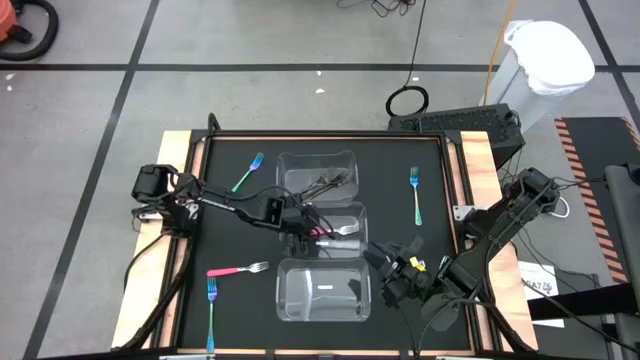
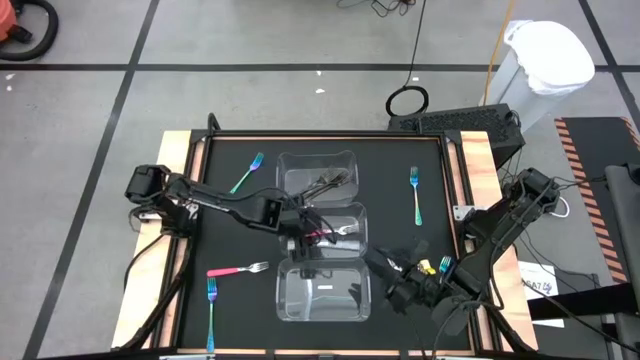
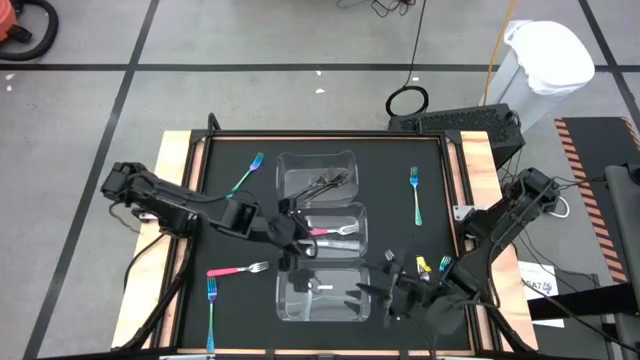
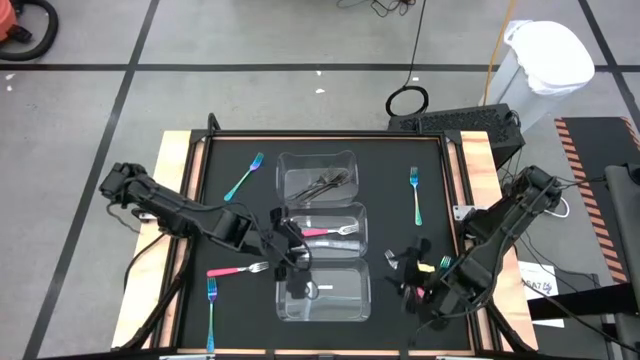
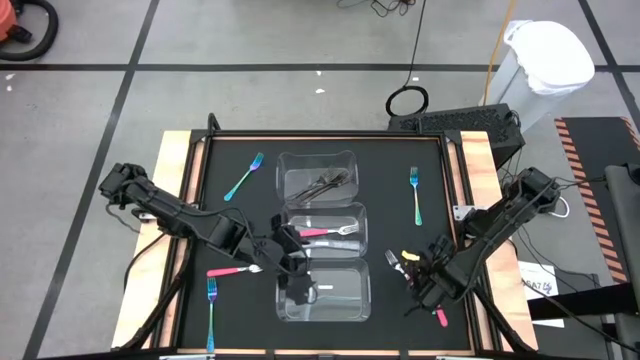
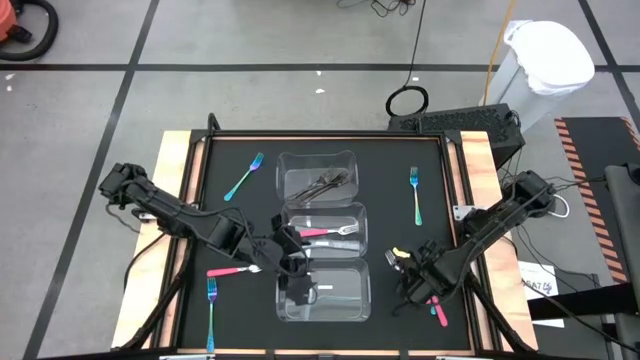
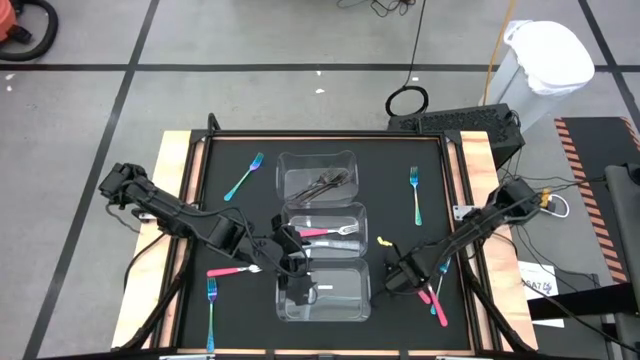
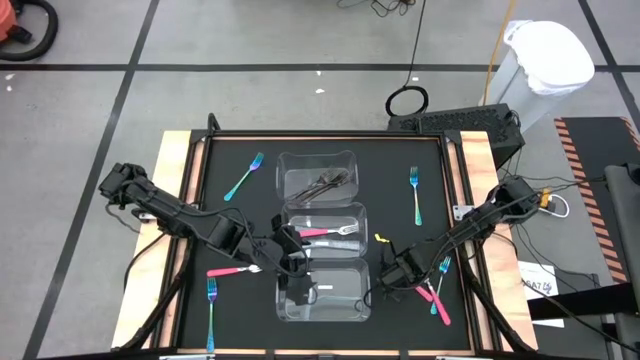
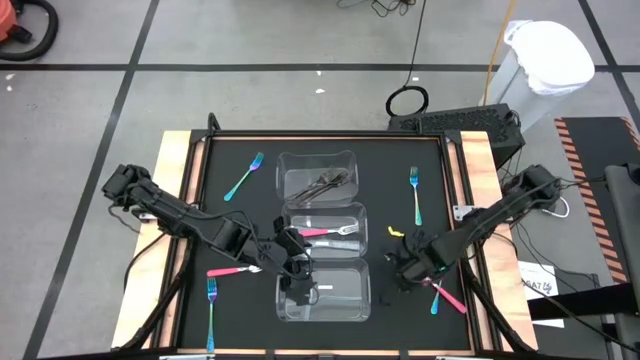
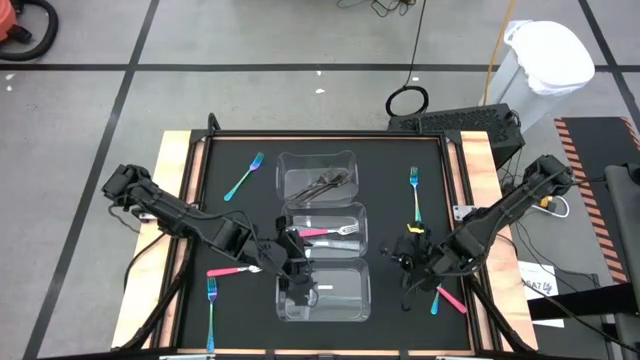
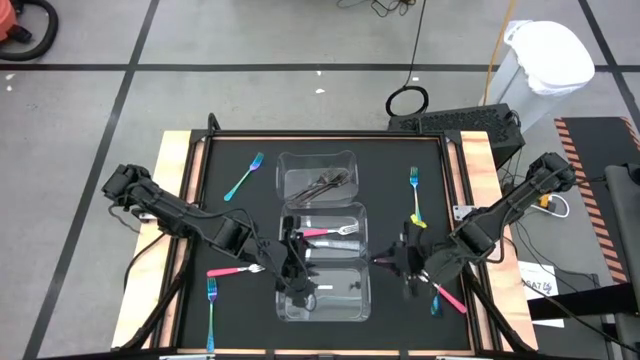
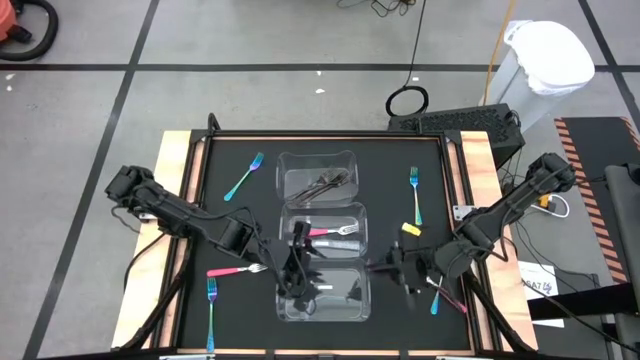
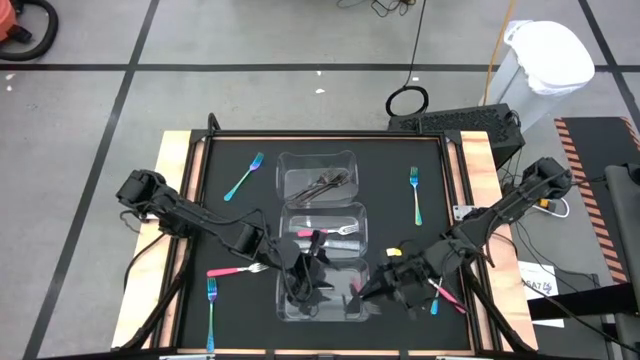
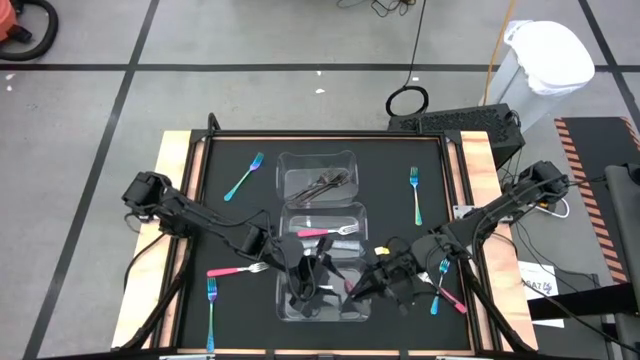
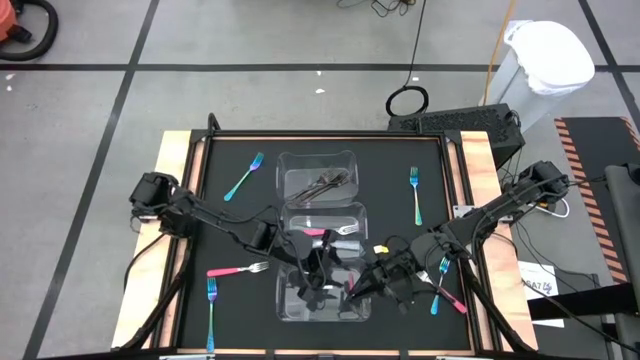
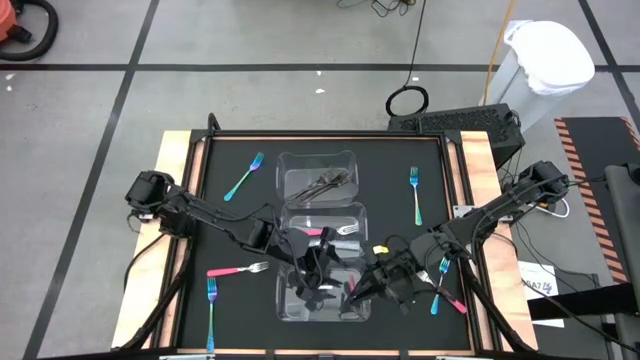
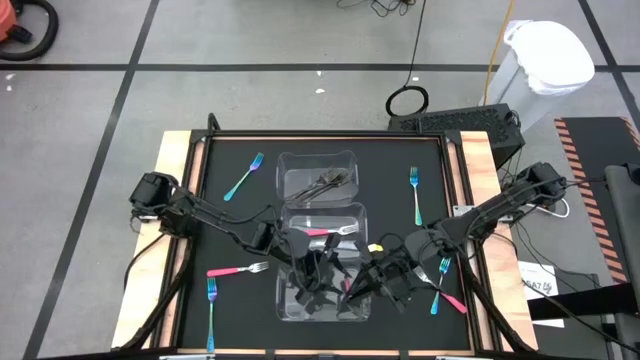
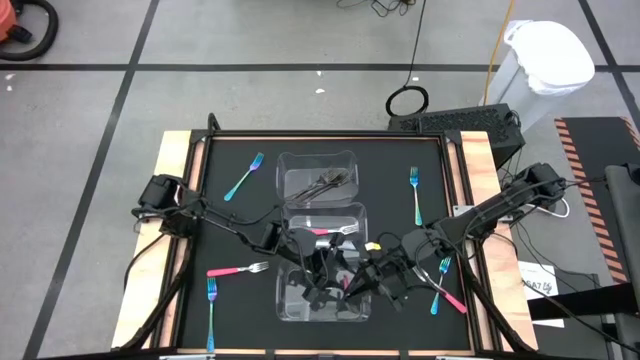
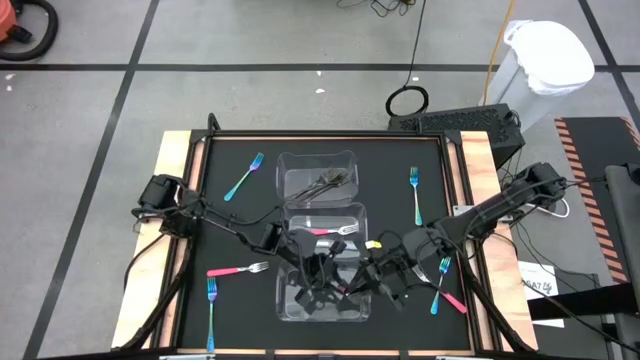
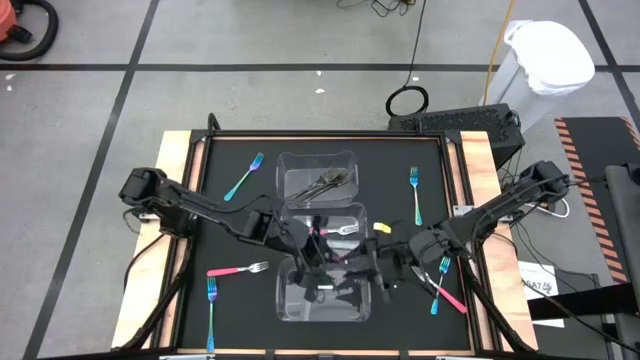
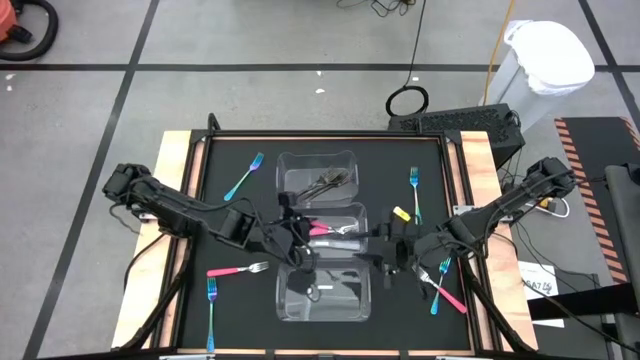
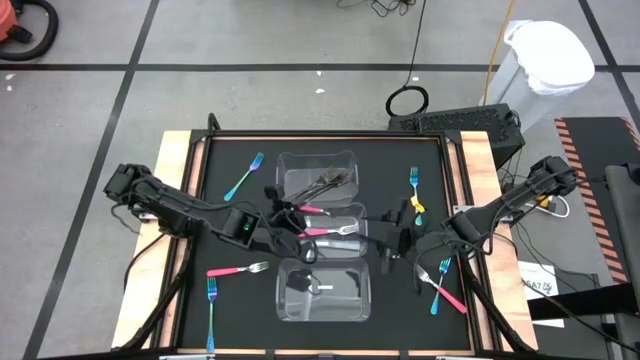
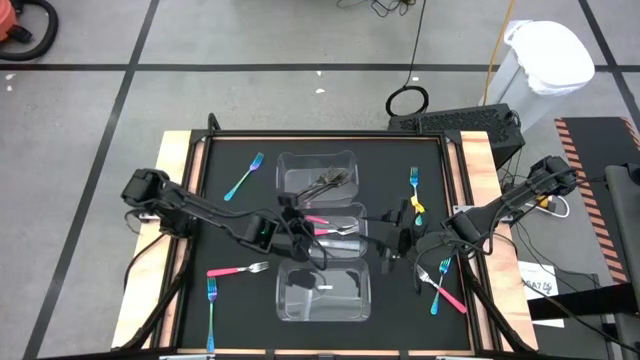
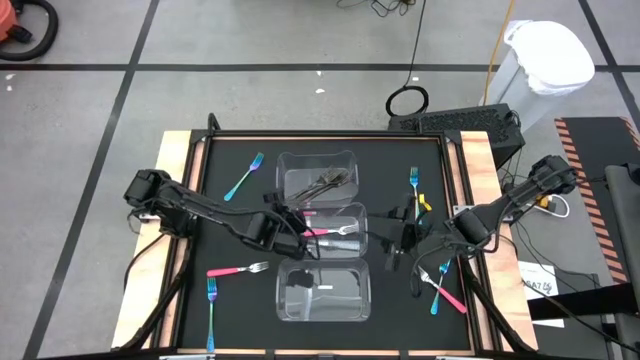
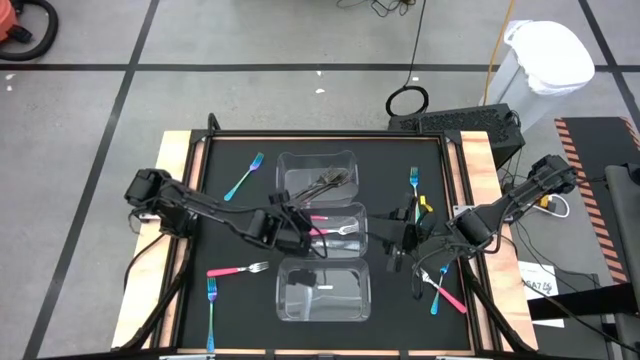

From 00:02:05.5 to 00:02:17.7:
Task: Sort silverware by color (type)
Put the middle pink fork into the middle transparent bin

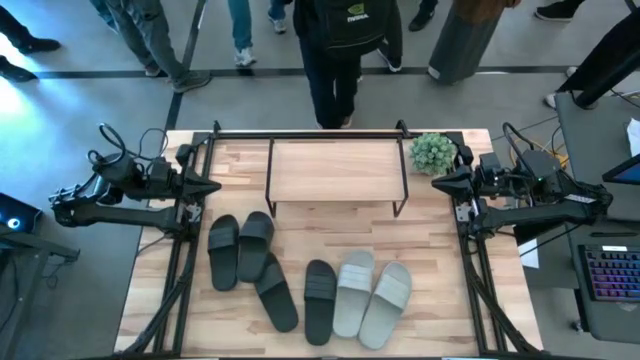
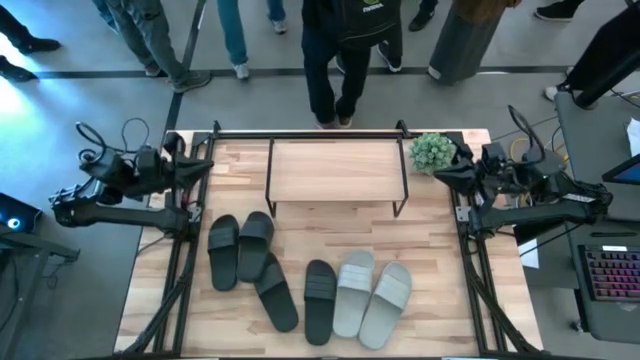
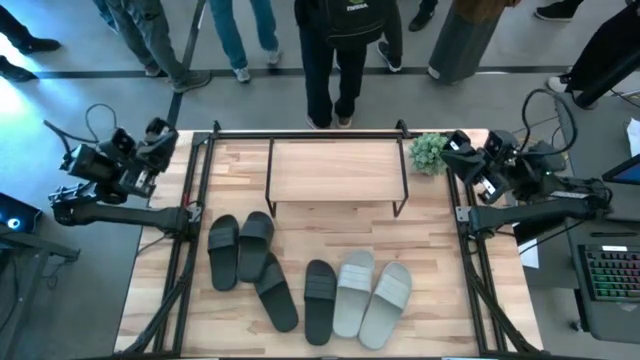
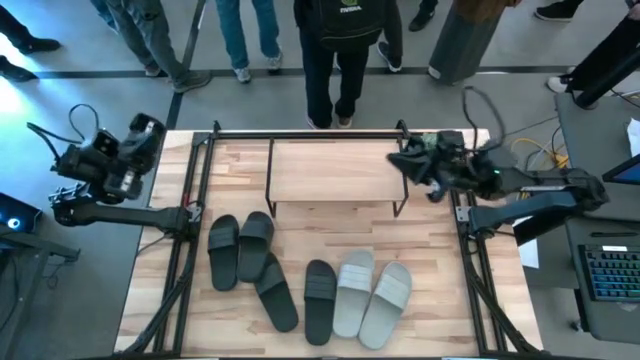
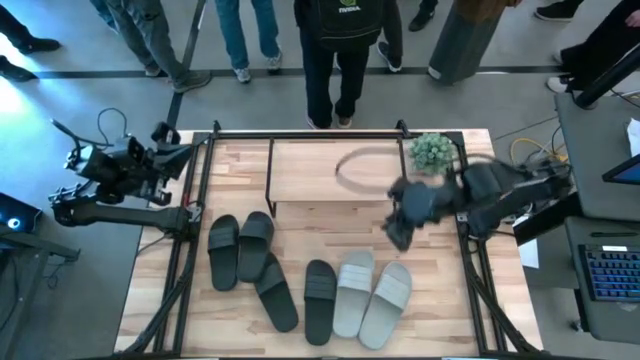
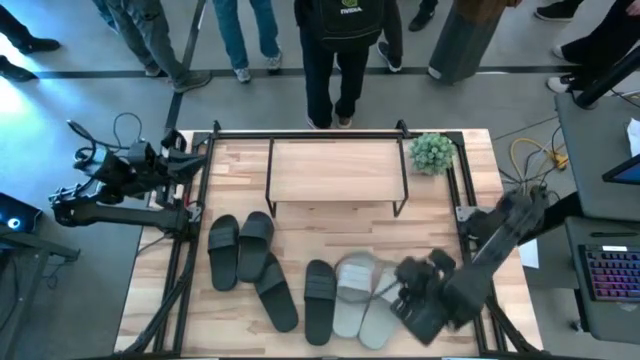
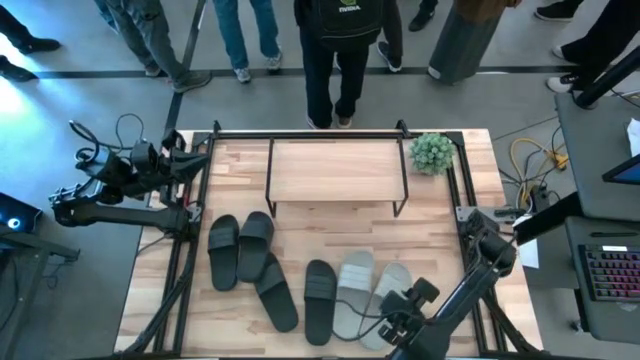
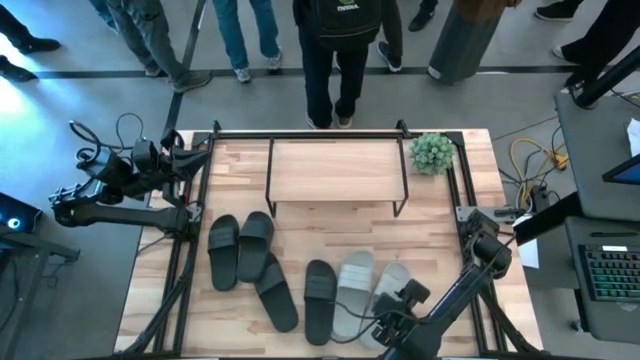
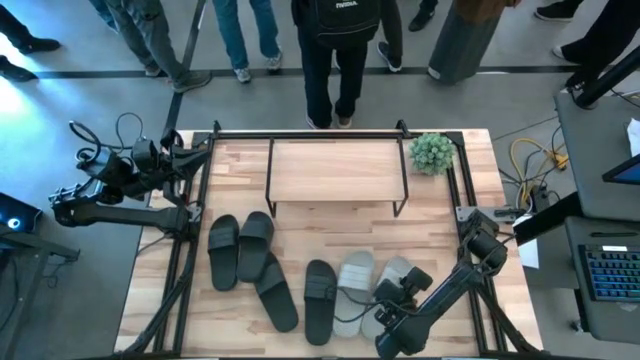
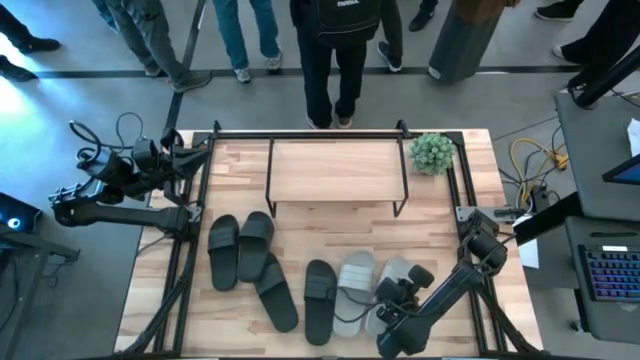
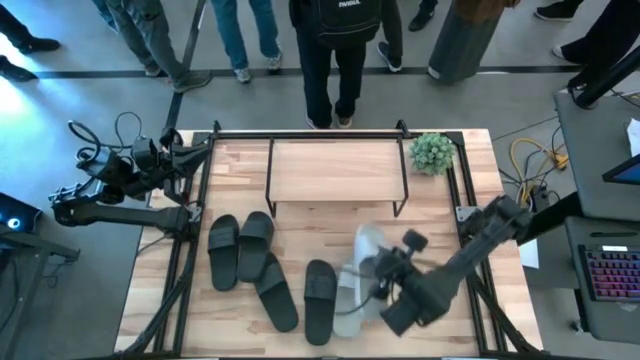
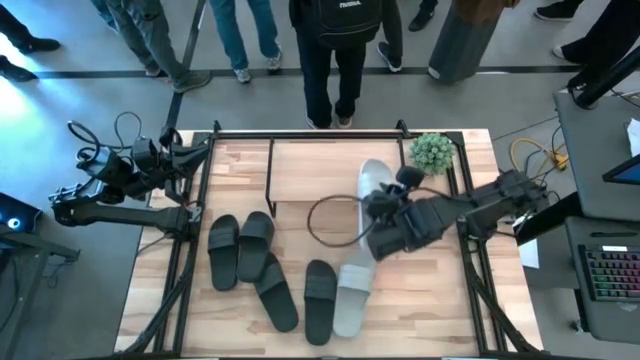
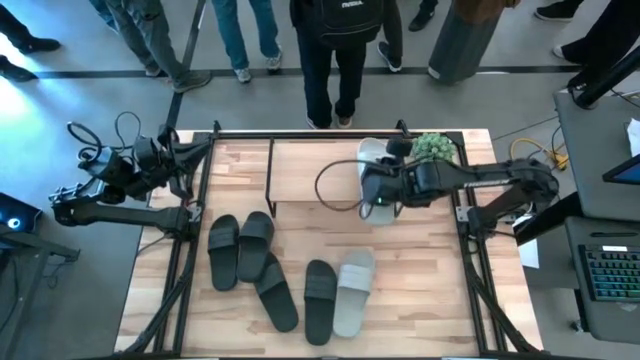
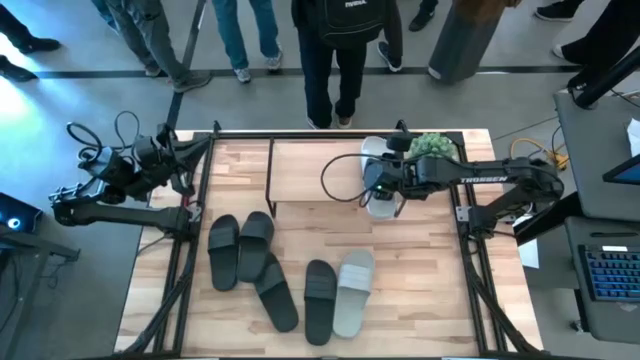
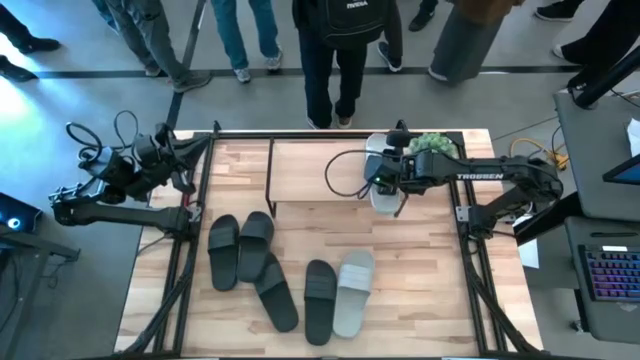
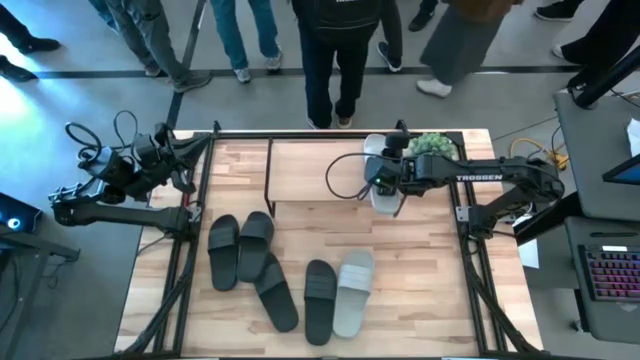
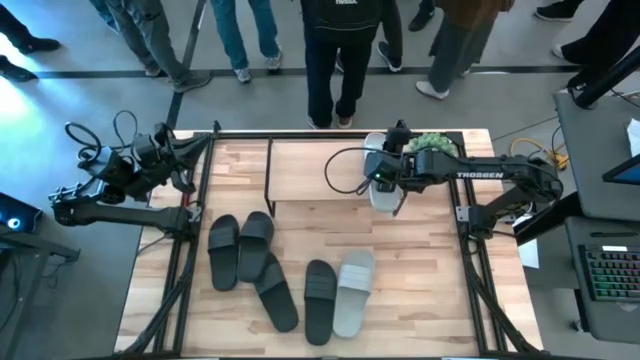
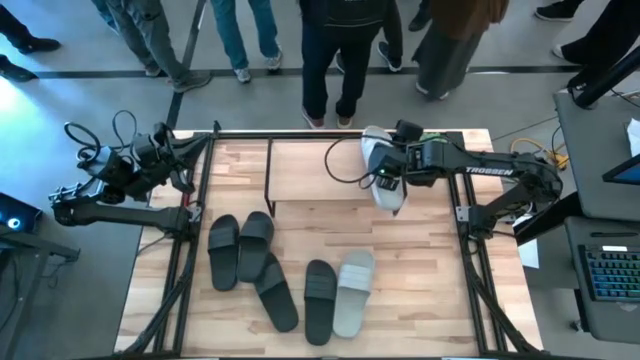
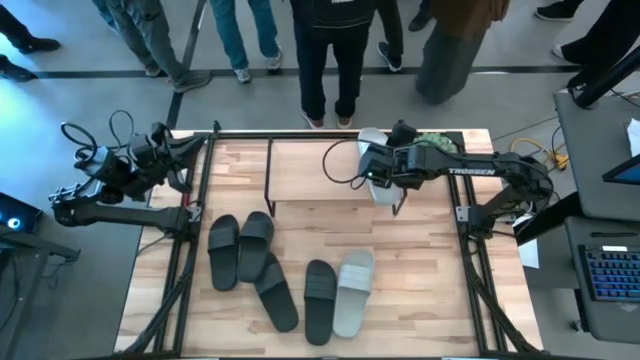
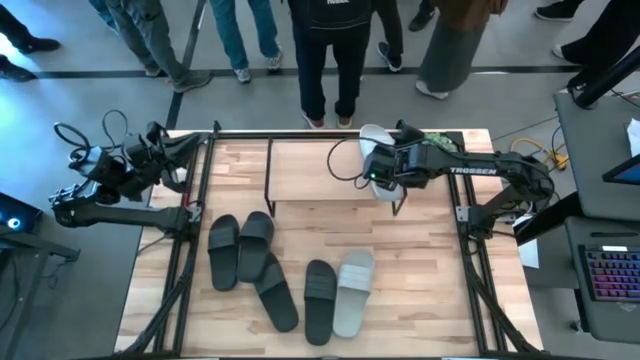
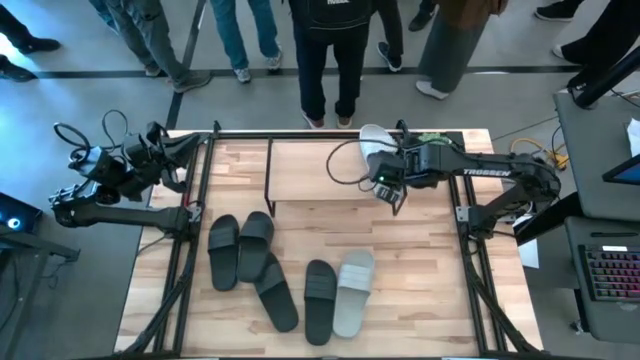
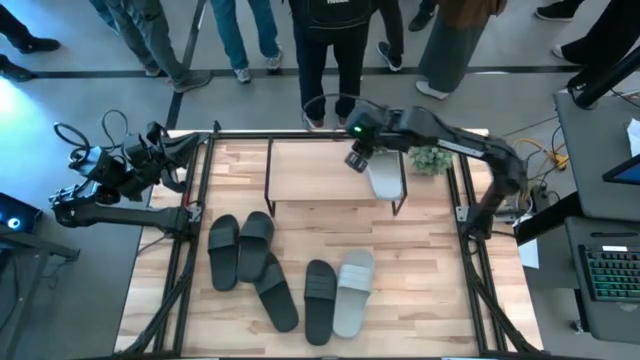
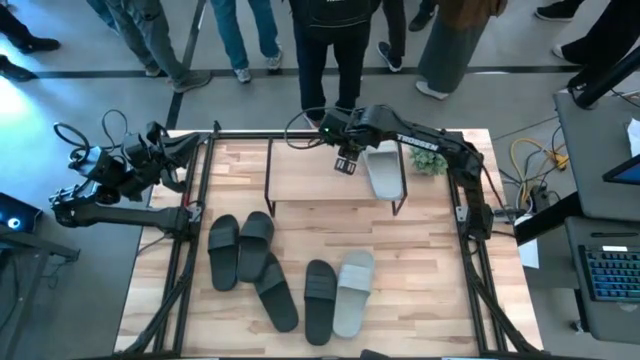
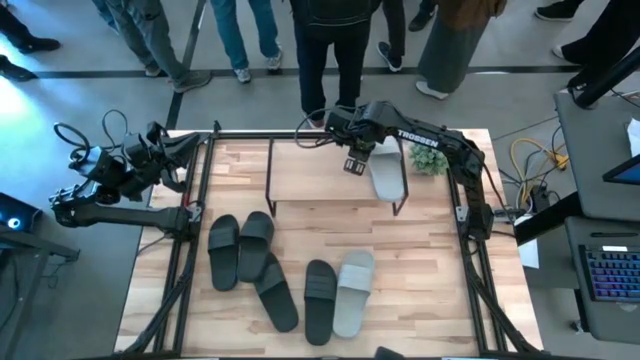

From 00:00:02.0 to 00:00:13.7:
Task: Pick and place slides into the shelf
Put the gray slide on the shelf
